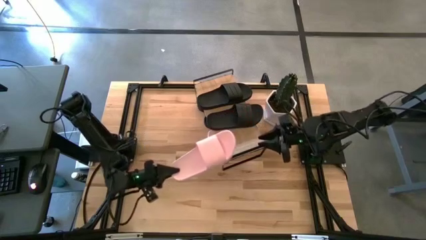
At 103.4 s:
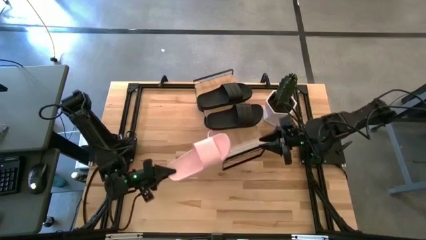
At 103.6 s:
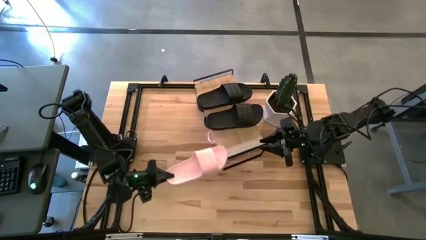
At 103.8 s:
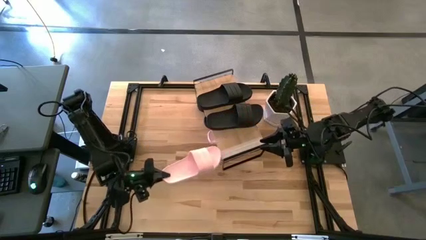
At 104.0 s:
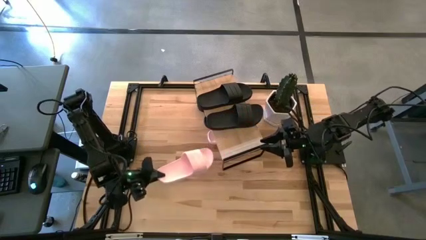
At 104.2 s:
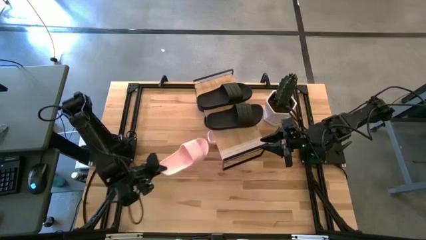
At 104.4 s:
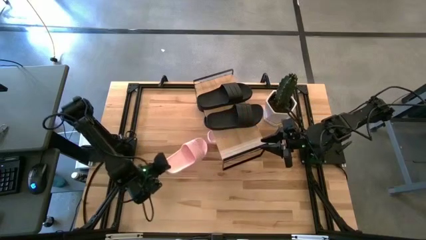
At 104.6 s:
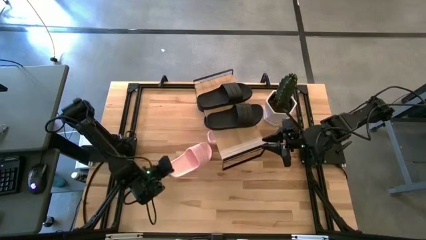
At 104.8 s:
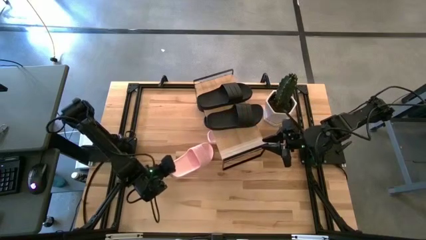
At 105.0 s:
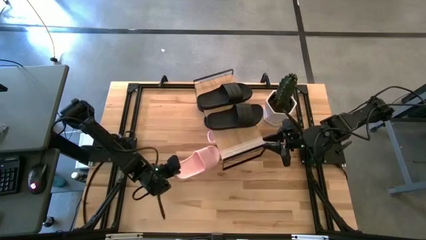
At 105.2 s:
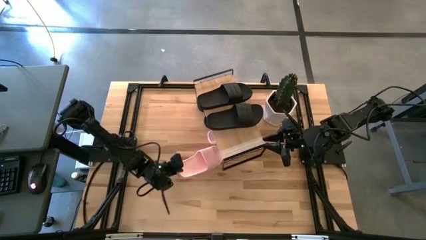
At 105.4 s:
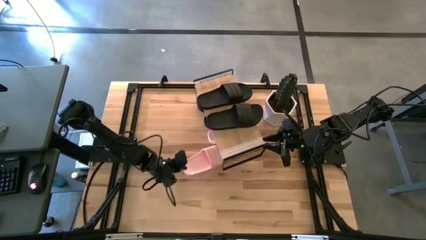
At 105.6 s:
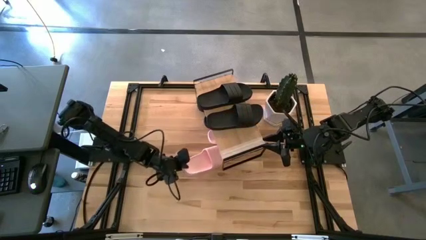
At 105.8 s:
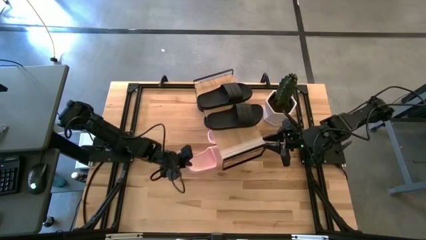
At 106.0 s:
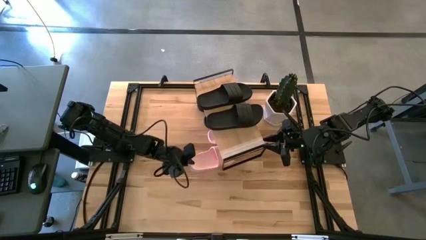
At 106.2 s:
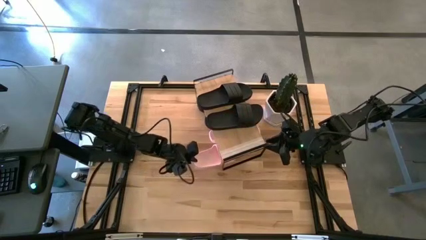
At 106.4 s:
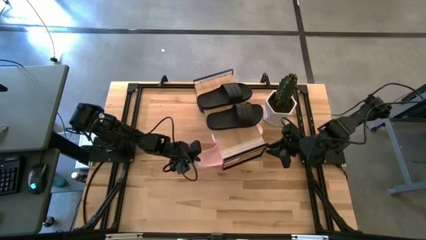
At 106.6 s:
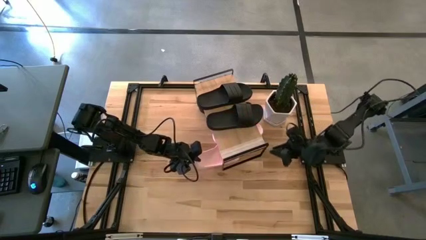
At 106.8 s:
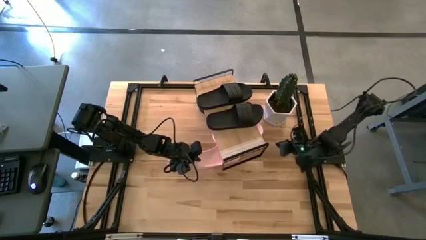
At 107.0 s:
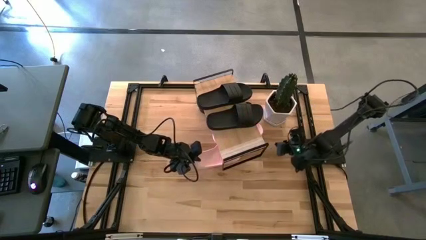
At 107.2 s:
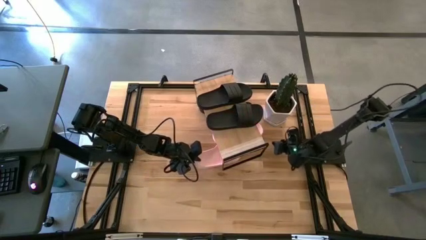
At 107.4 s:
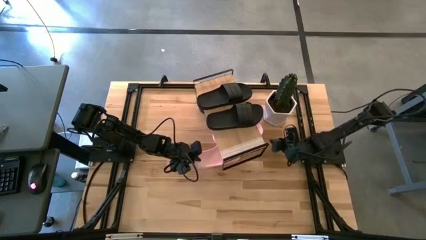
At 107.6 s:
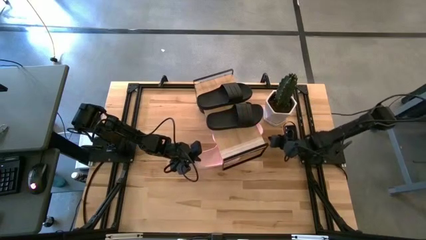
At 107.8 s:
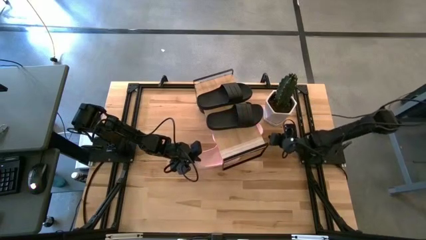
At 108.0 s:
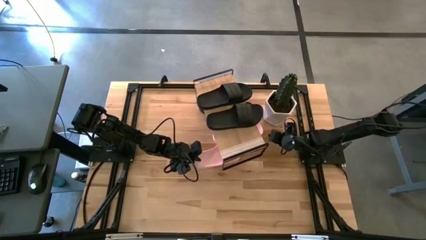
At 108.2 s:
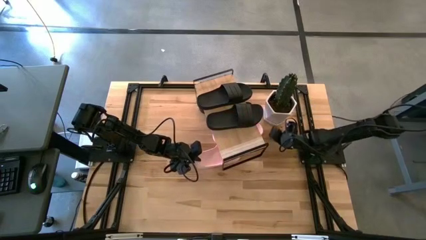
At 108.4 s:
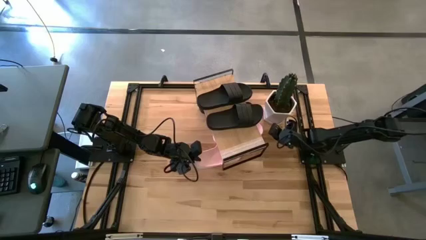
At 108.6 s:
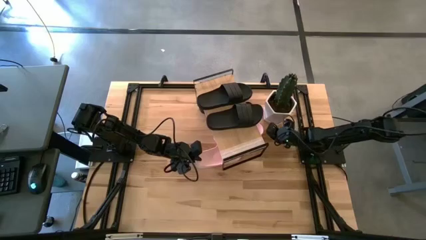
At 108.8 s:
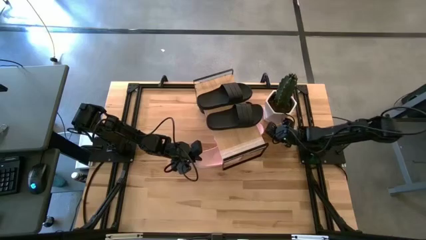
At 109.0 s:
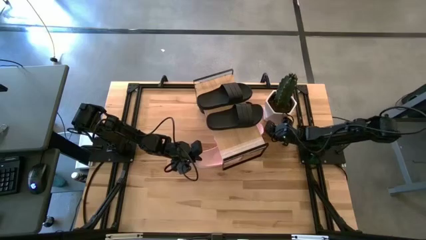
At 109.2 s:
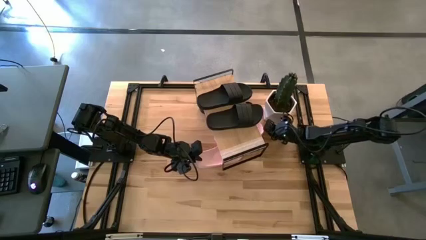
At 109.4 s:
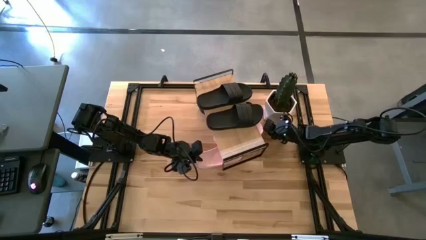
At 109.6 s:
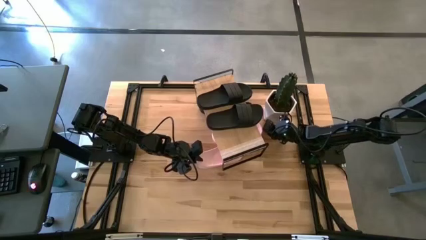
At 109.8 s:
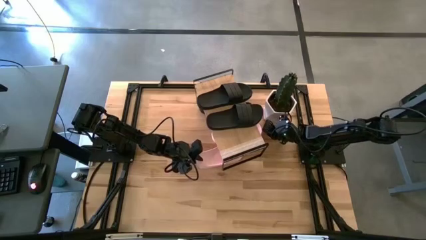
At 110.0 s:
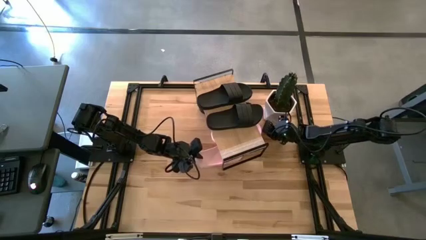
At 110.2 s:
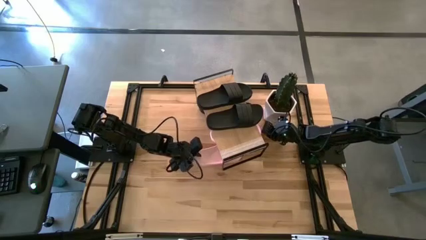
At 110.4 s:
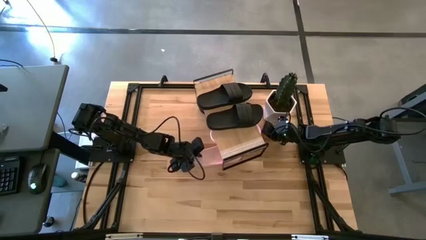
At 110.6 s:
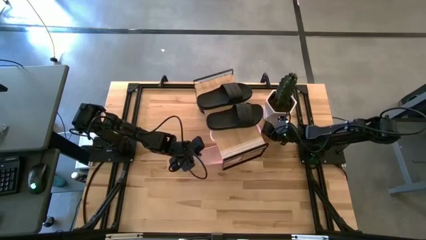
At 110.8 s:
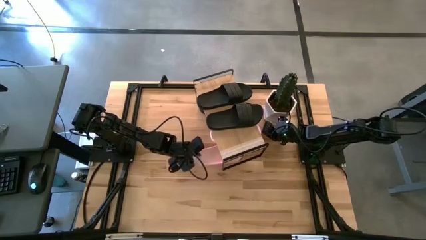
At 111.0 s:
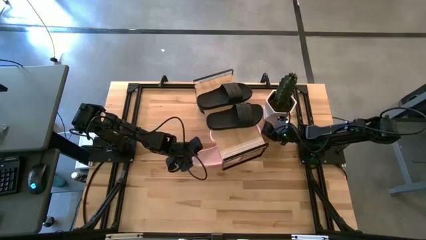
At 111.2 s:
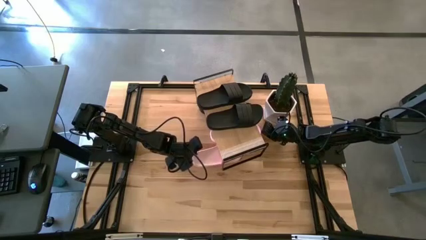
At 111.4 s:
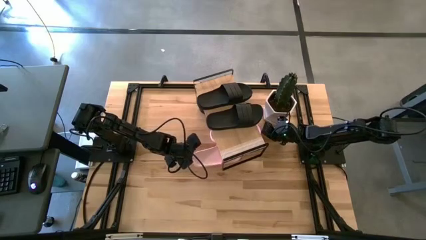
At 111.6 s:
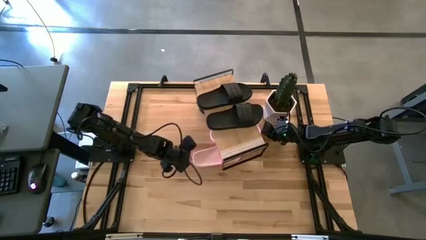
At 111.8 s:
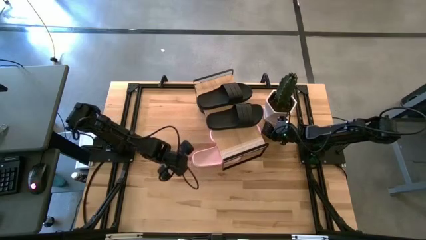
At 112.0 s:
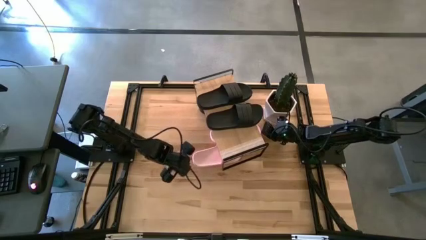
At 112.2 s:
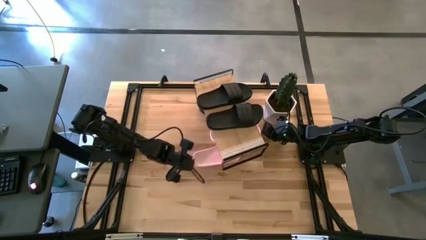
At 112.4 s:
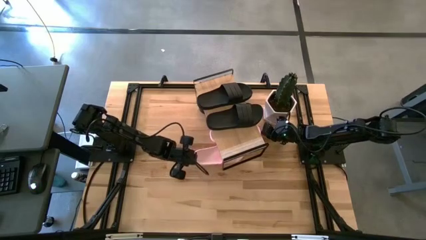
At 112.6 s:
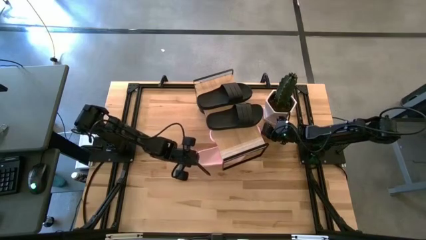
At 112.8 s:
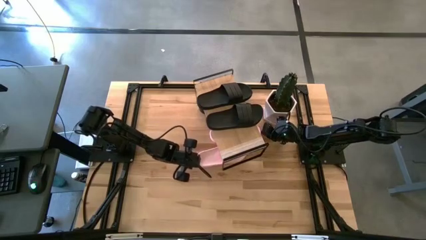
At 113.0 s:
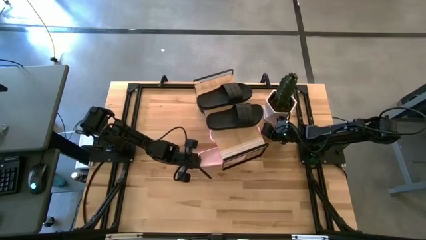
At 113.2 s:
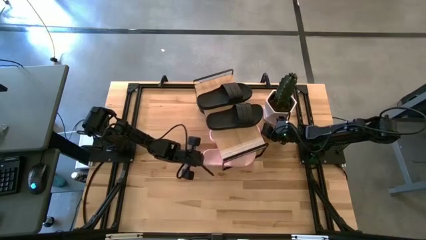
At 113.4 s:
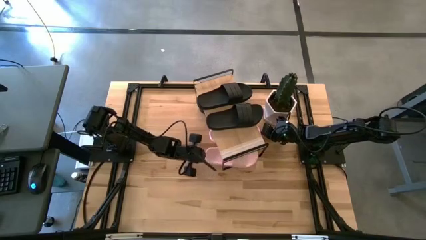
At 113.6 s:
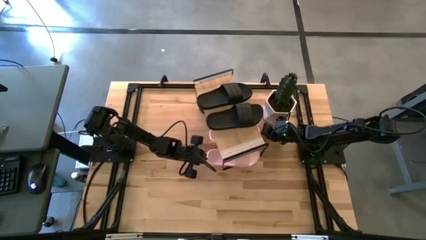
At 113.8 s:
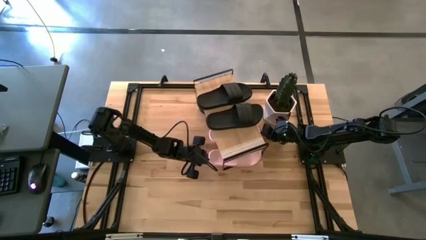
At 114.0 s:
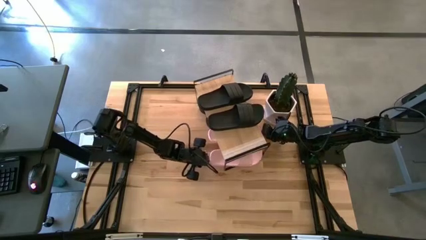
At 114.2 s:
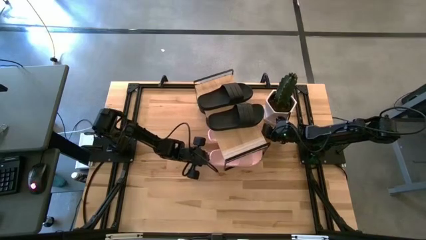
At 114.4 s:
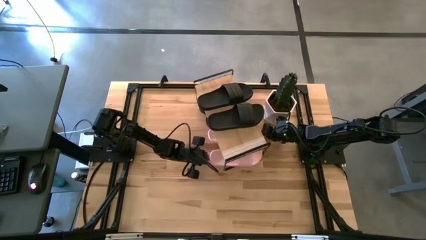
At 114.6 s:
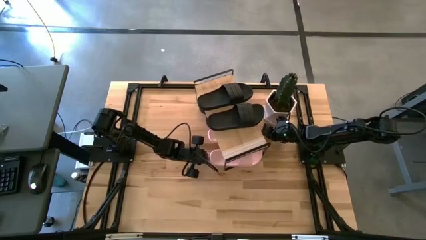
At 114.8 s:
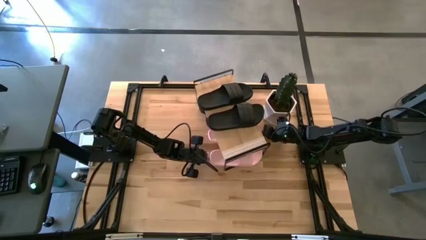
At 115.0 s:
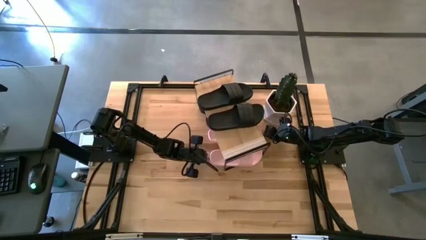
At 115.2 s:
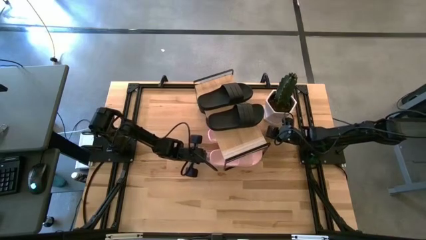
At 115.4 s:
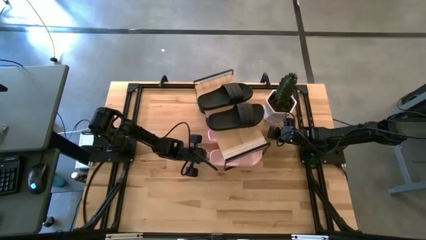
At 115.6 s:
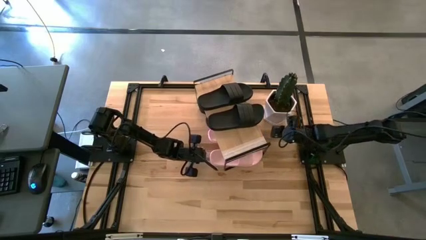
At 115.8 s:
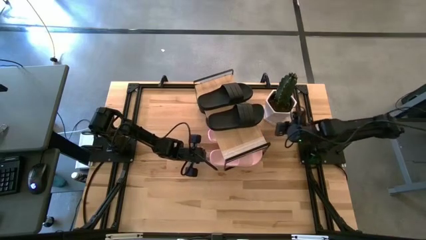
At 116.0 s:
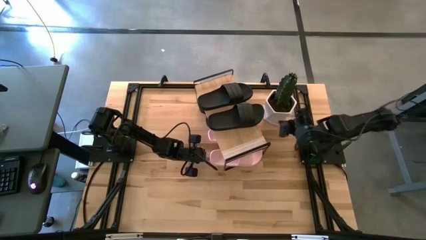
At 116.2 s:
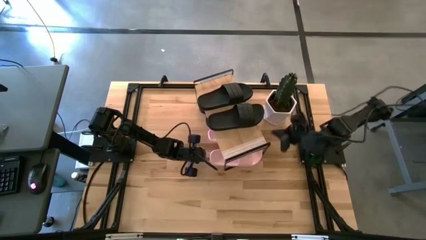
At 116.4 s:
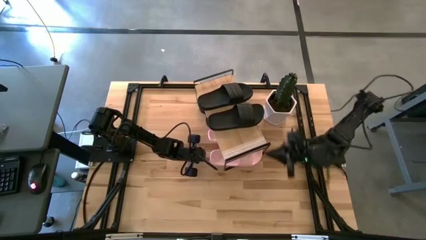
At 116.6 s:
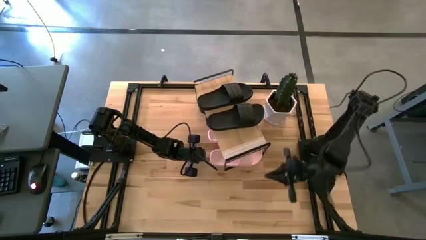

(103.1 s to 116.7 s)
Task: Pick and place slides into the shelf
Put the pink slide under the shelf

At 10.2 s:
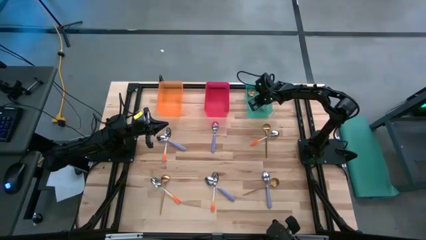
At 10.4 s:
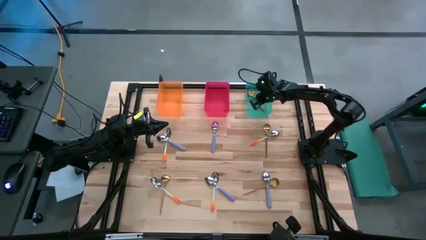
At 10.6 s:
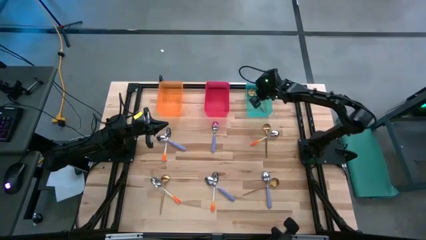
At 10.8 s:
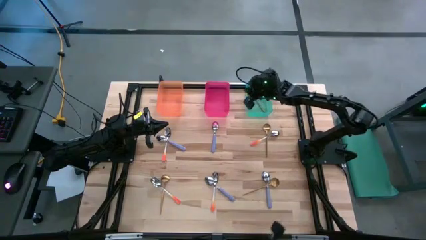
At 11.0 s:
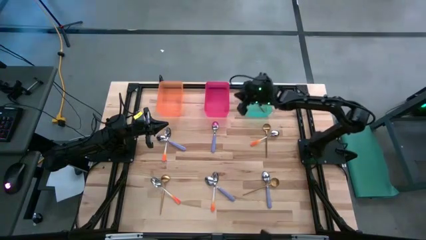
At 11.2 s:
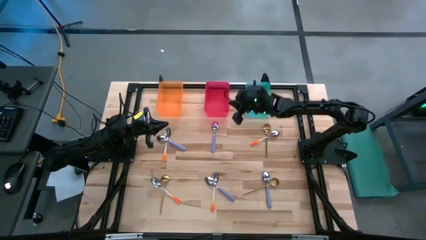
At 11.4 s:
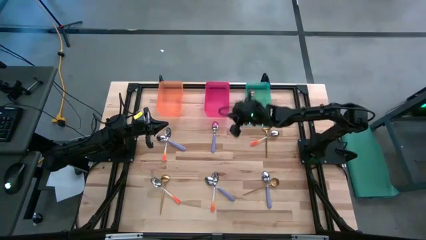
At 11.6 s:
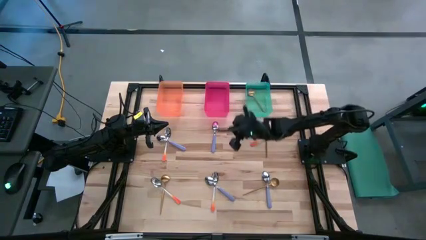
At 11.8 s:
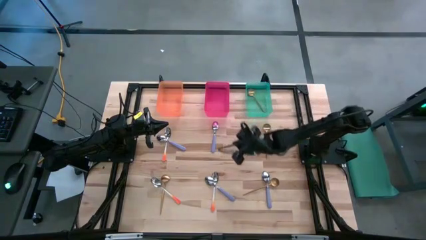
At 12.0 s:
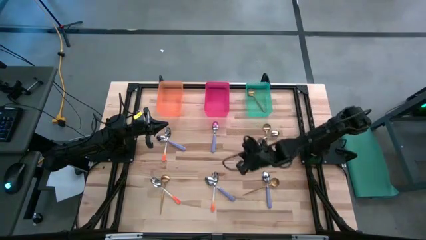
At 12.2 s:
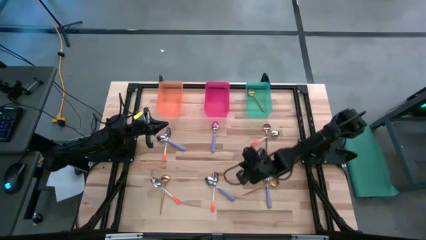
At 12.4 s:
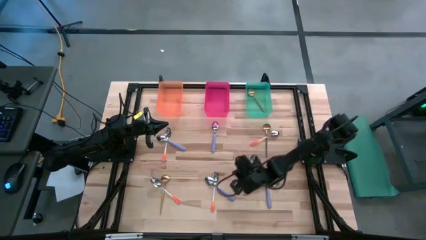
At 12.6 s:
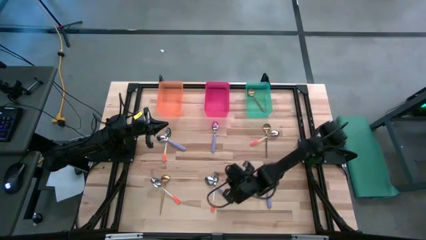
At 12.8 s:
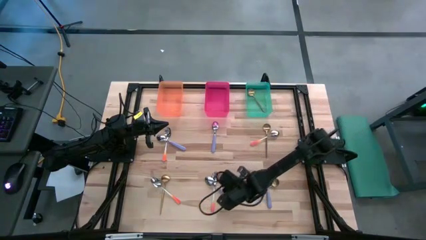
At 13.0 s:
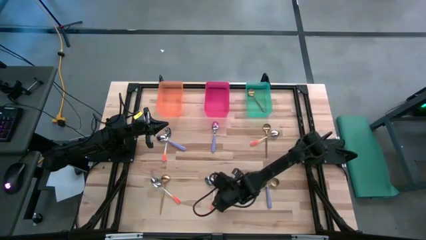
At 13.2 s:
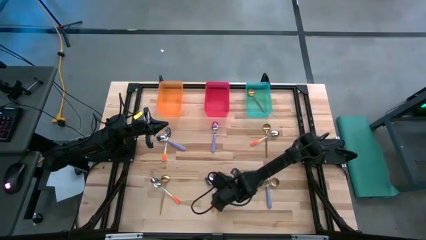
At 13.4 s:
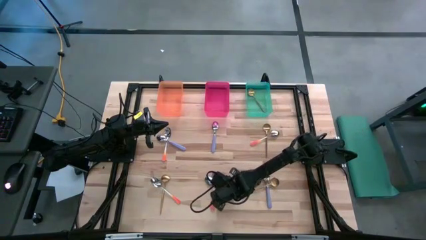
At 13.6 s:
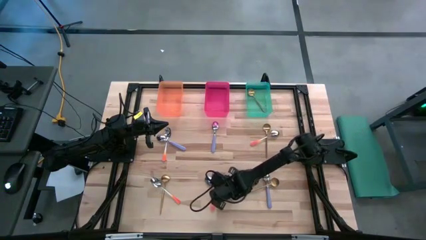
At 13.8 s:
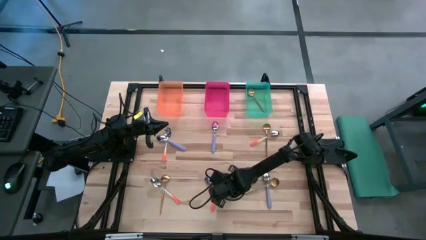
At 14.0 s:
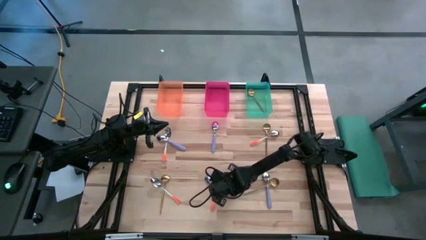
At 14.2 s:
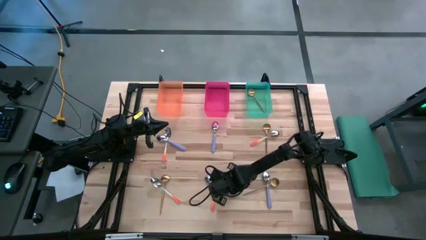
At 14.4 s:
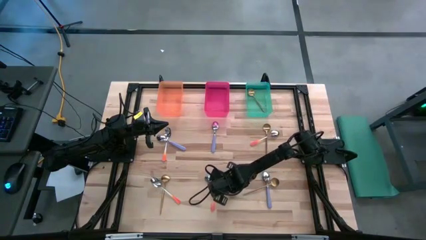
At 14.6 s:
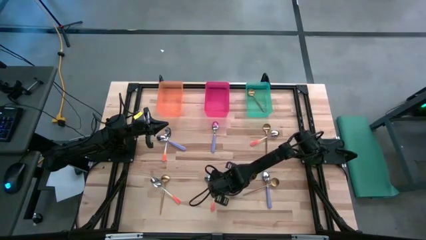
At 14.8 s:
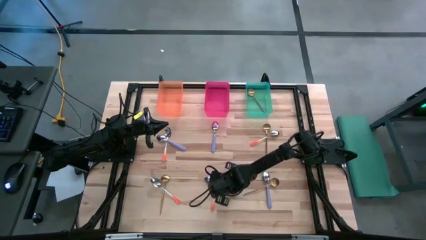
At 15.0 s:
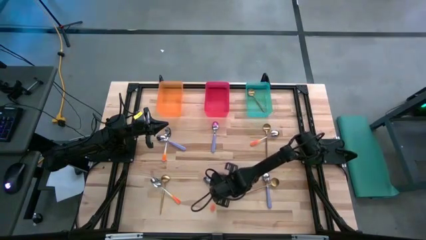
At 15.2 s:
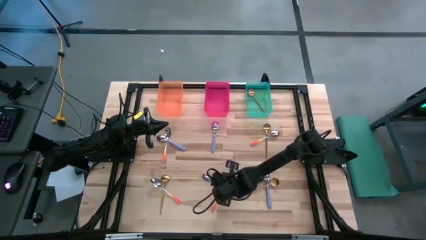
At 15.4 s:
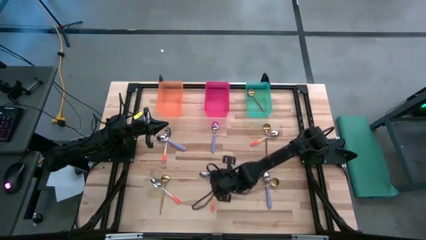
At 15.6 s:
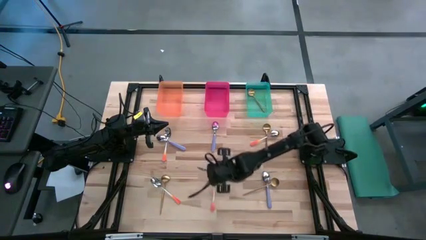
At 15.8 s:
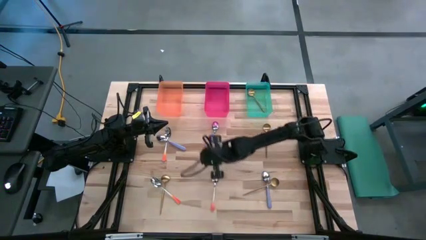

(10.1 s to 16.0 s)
Task: Sort silverware by color (type)
Put the purple spoon into the orange bin
